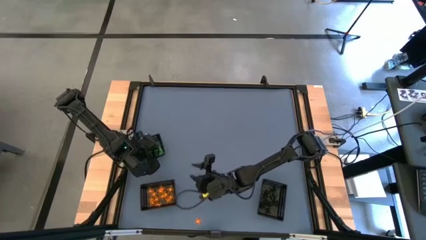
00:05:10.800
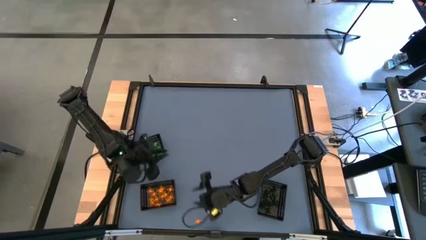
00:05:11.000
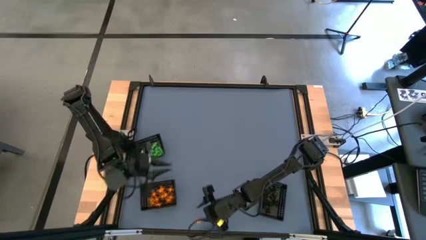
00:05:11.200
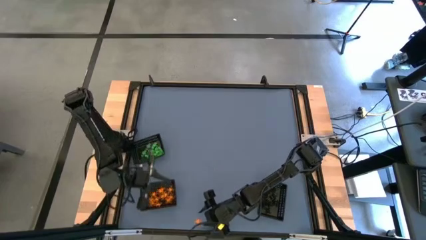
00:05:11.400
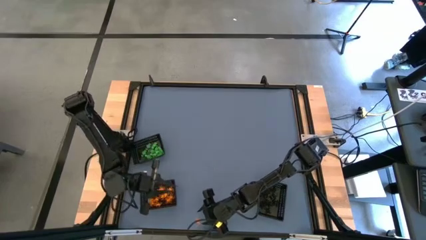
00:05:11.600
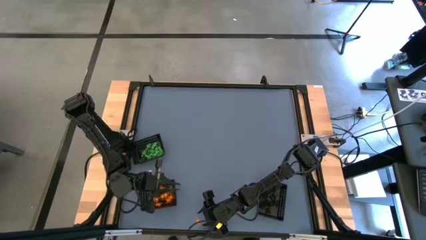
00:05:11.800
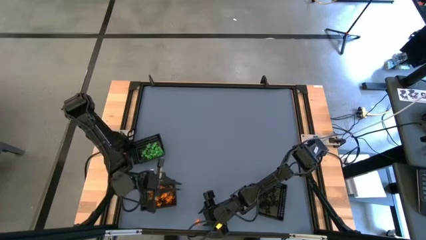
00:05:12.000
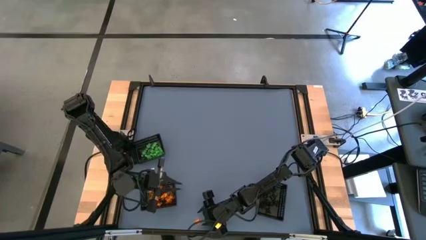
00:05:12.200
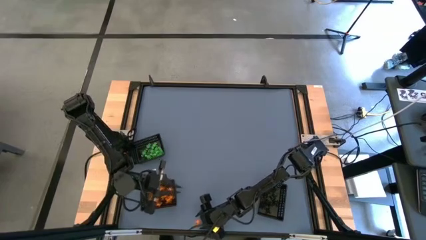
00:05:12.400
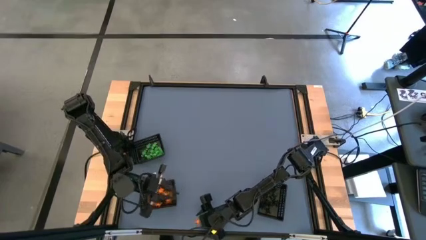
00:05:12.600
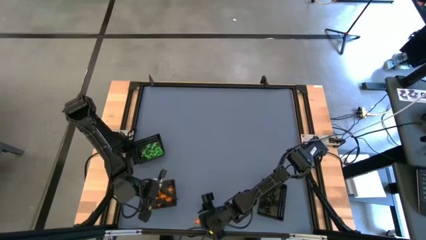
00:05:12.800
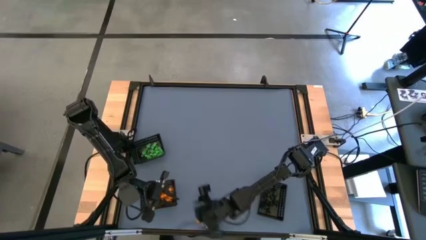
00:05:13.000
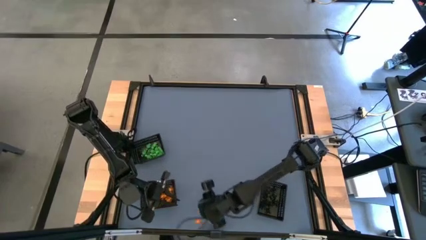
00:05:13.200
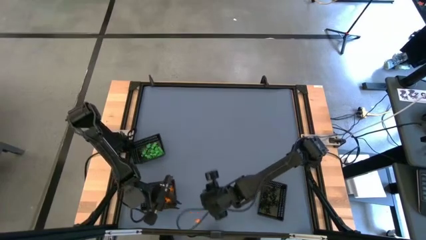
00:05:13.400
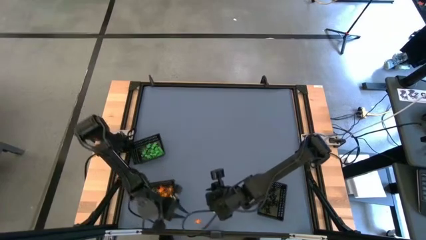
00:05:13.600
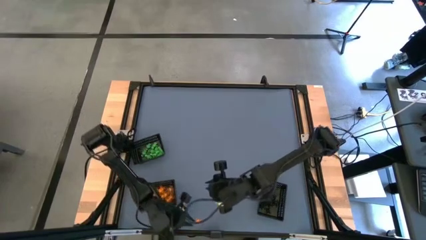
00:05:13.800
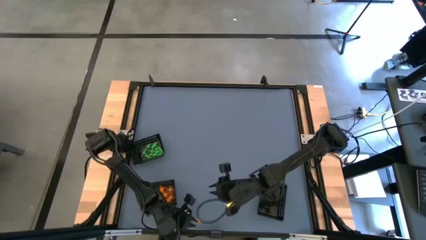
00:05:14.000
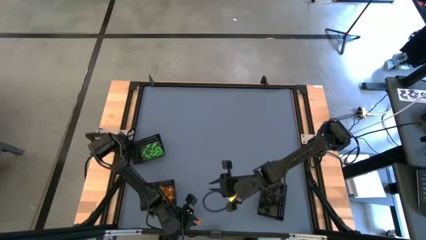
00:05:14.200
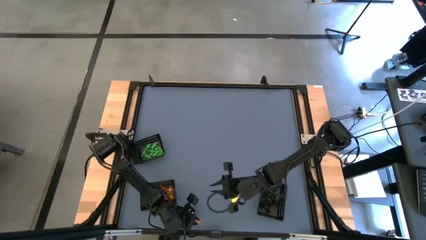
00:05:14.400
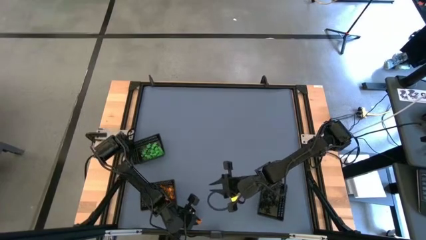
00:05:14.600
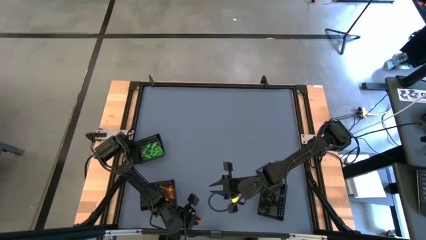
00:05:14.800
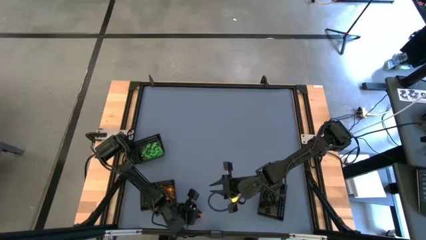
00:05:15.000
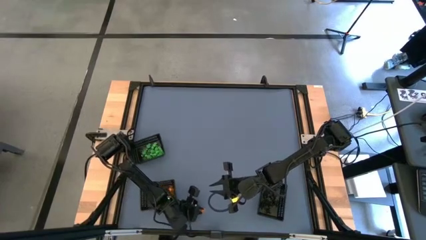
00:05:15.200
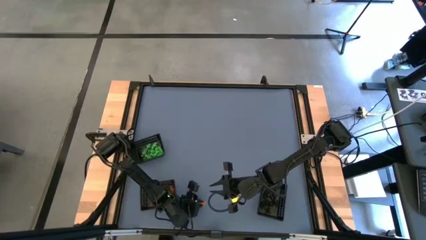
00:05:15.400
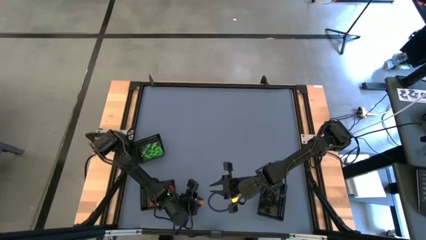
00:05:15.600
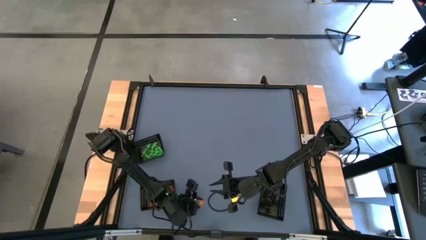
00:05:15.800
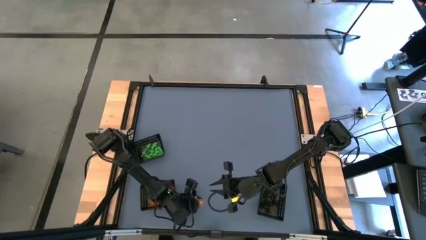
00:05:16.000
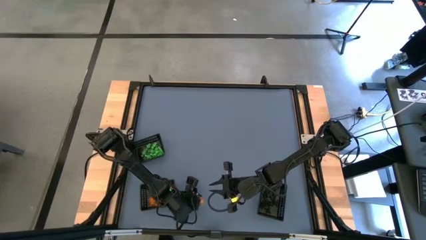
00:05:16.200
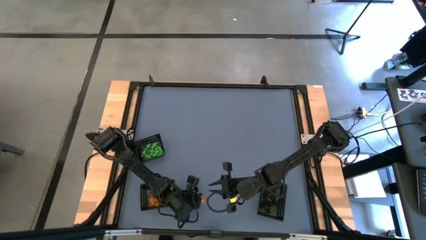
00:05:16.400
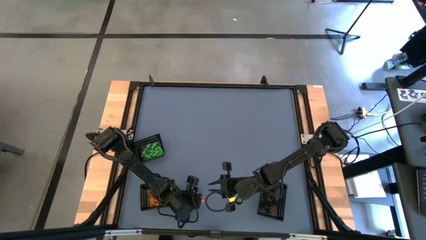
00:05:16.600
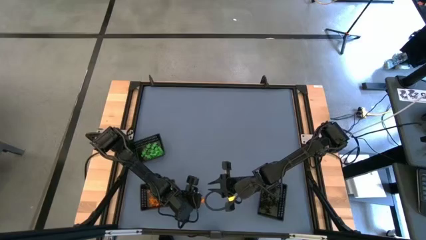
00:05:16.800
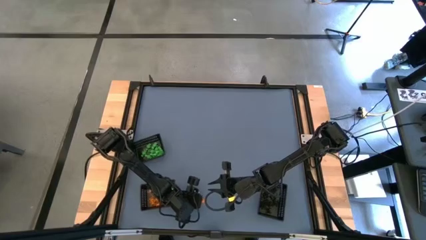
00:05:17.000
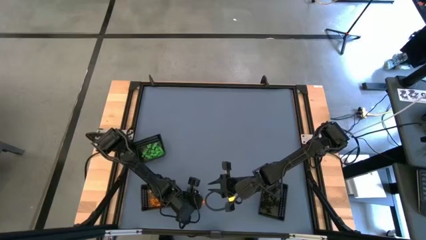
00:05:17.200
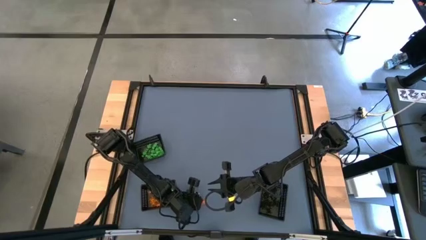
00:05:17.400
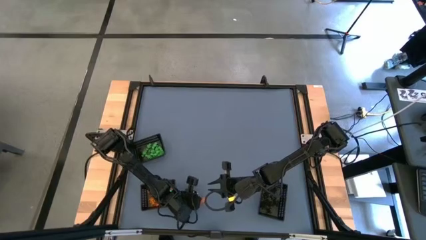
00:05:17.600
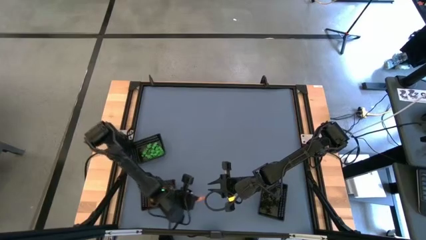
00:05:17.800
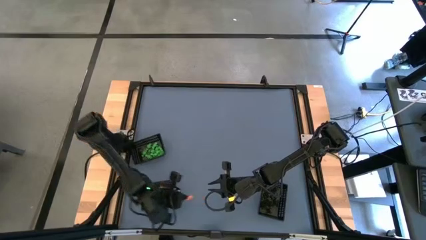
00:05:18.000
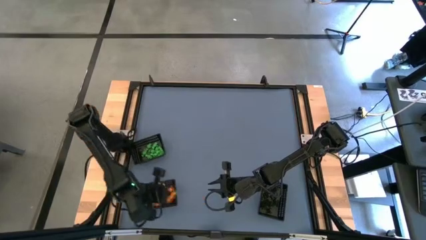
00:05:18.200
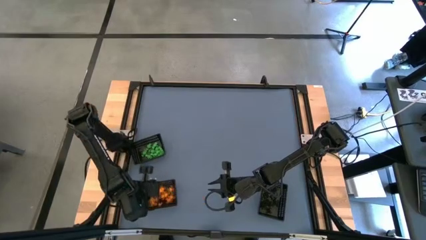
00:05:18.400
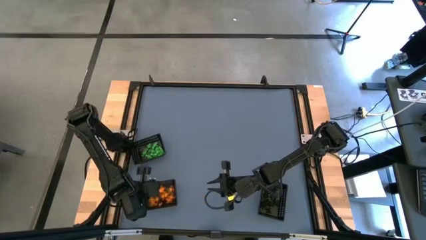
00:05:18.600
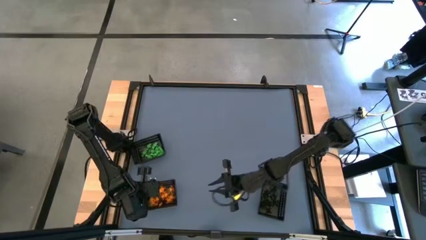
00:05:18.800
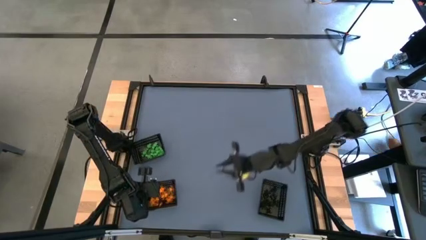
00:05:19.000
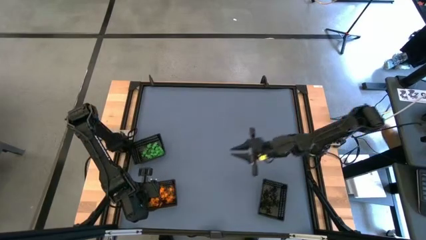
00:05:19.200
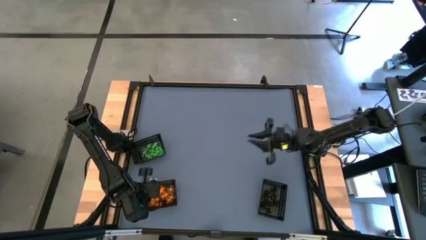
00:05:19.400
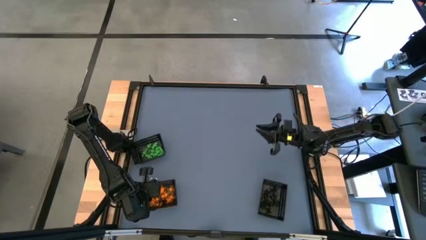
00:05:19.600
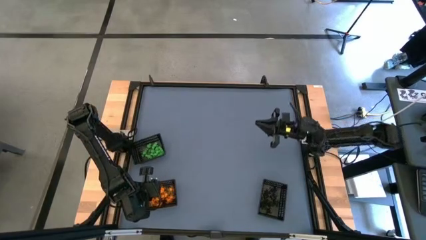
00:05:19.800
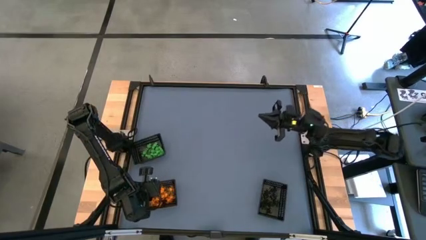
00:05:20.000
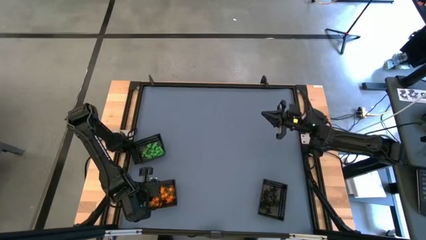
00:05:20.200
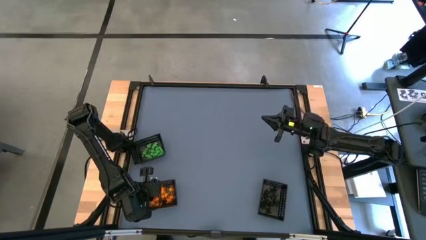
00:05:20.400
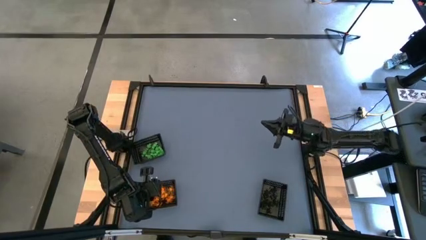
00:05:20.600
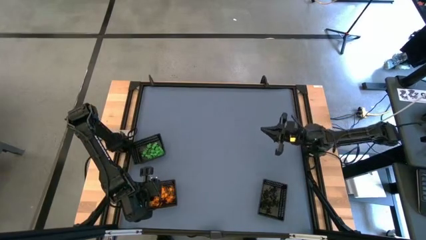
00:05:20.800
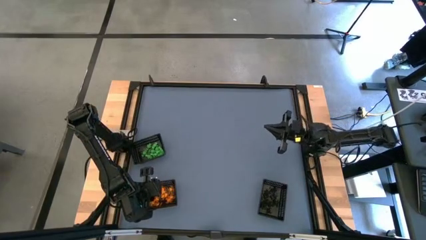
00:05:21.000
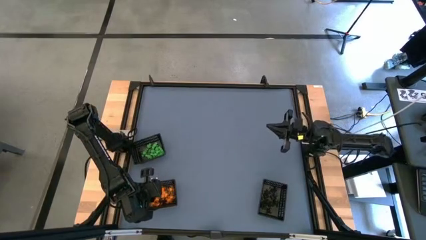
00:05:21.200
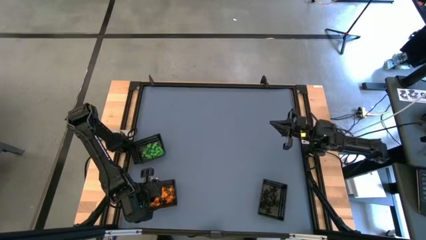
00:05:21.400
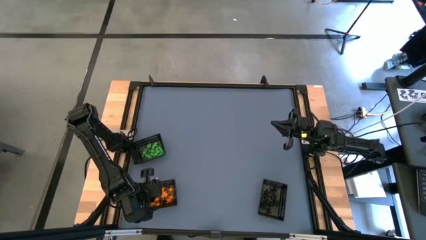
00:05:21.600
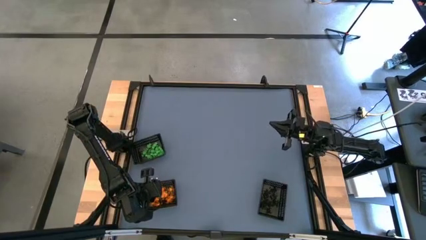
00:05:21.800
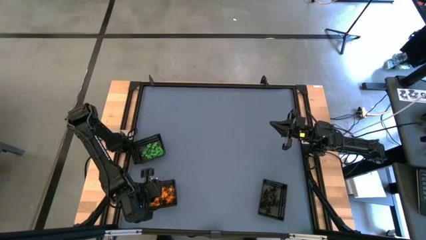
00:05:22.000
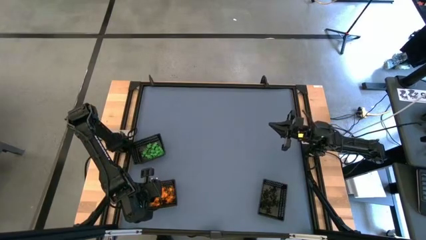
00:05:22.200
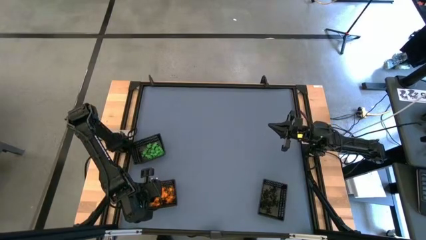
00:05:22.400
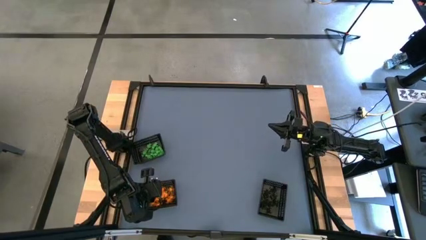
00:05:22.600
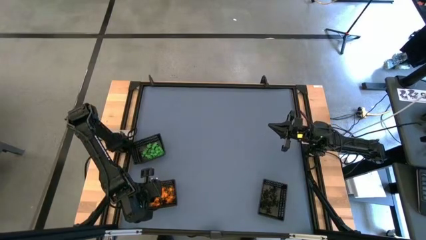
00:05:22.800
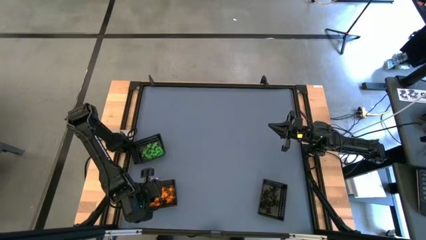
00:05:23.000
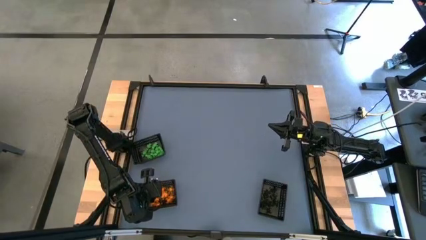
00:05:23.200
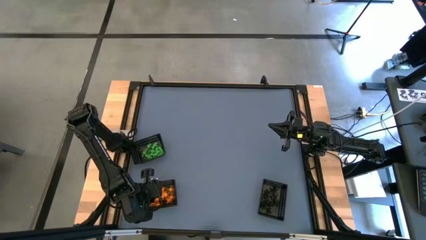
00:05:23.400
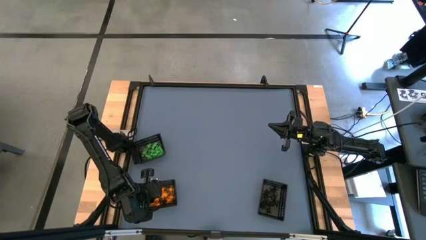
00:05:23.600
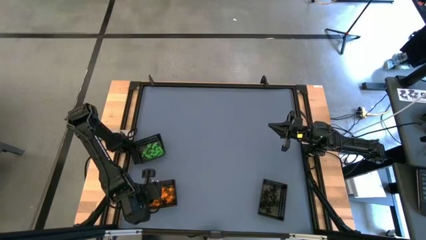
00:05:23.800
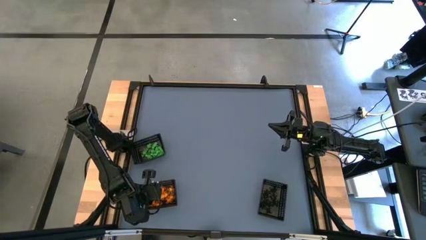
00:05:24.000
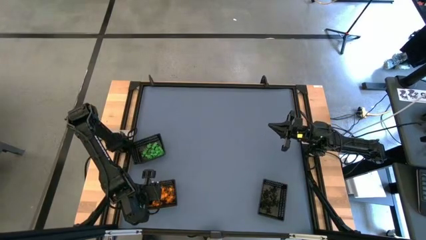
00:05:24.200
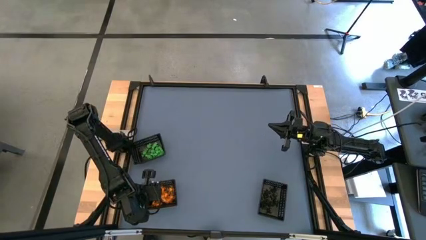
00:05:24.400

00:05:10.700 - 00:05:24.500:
Task: Sort Halloween decoration
Put the orange spider toy into the bottom left black bin

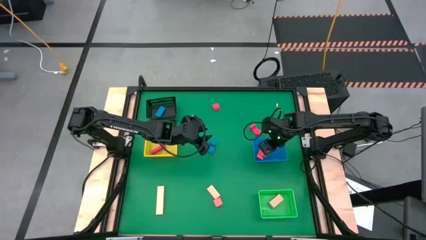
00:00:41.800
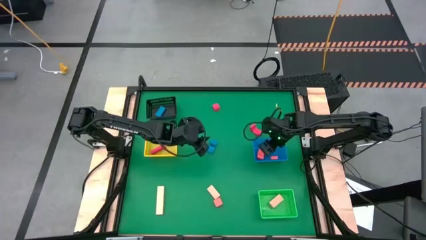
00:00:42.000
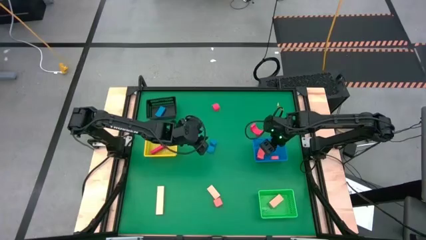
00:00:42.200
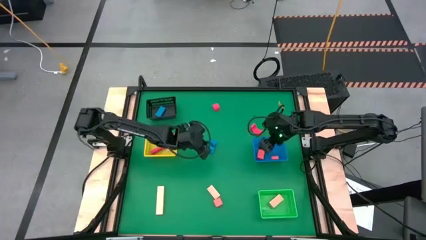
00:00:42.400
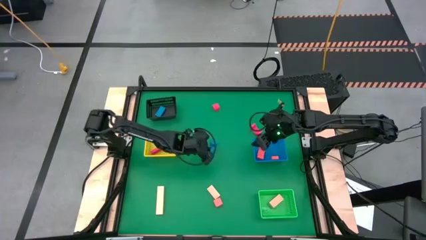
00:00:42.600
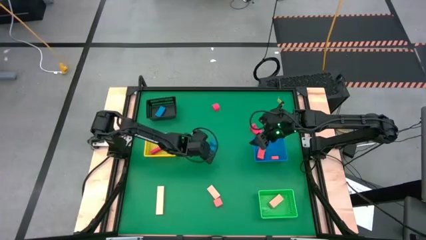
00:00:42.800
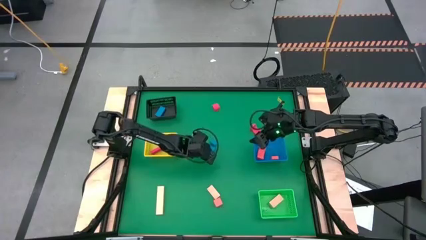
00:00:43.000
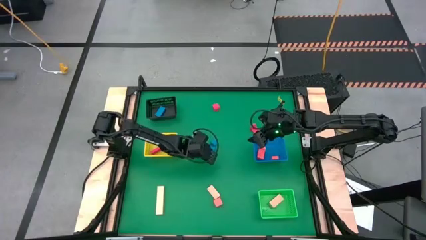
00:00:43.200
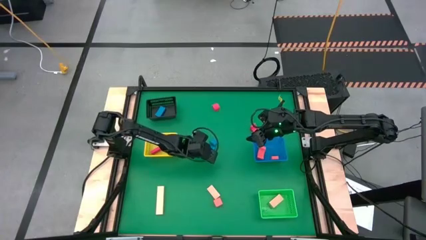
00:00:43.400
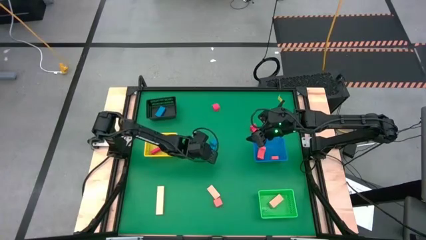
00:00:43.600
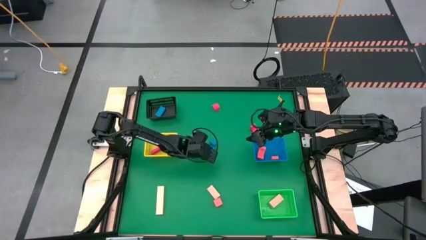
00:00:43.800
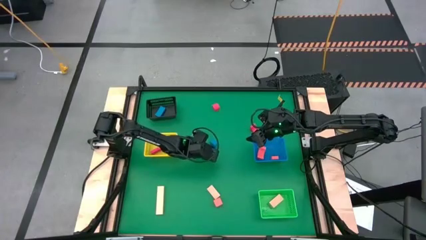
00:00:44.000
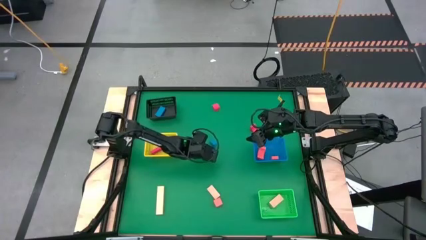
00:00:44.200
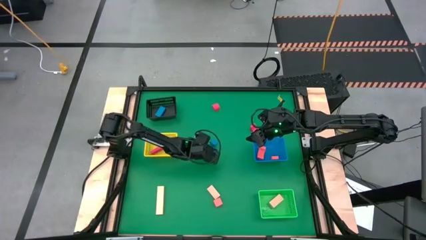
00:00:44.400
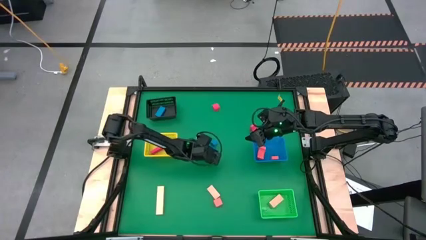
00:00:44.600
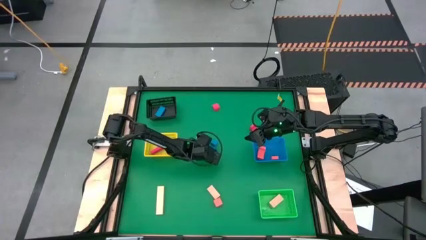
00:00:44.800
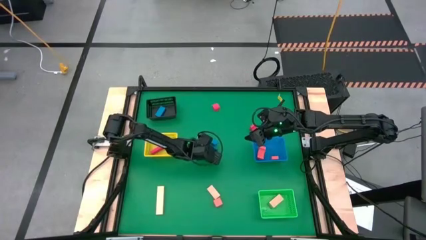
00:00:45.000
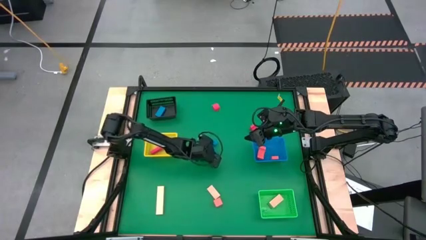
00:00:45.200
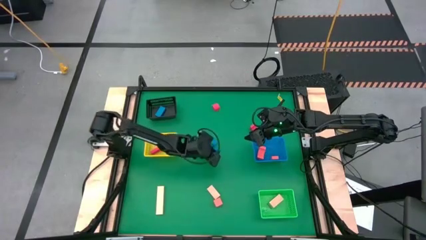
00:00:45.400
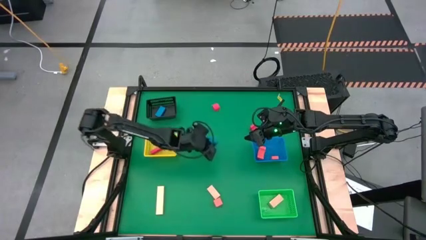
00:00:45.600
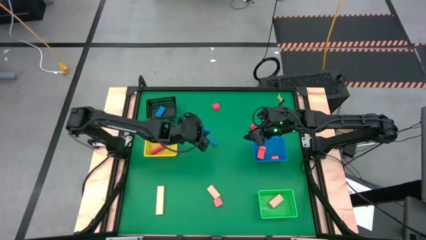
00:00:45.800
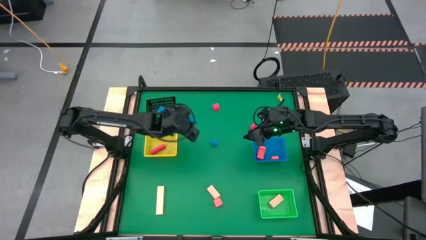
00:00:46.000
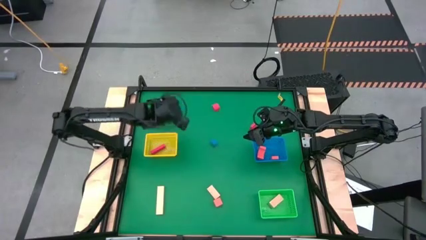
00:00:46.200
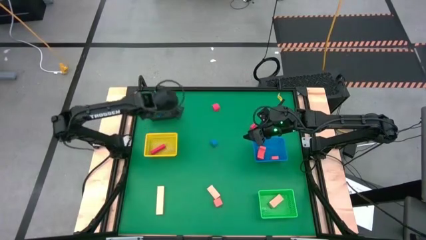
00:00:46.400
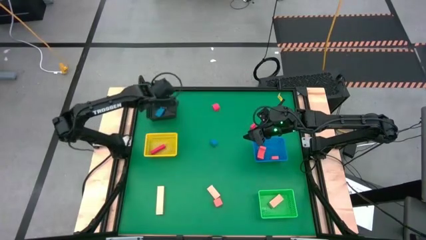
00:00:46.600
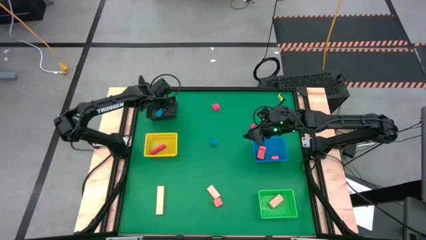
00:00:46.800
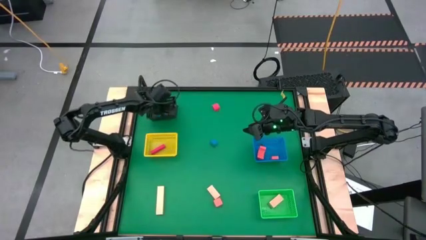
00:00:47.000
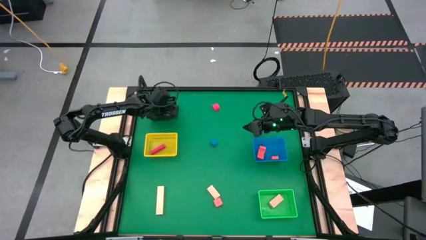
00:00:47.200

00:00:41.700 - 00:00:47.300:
Task: Sort & place blocks by color
Put the bottom blue block into the black bin
